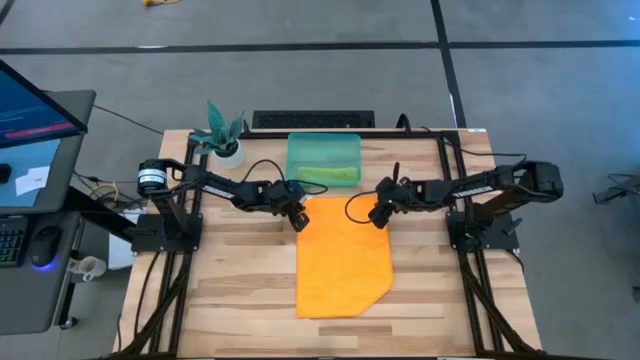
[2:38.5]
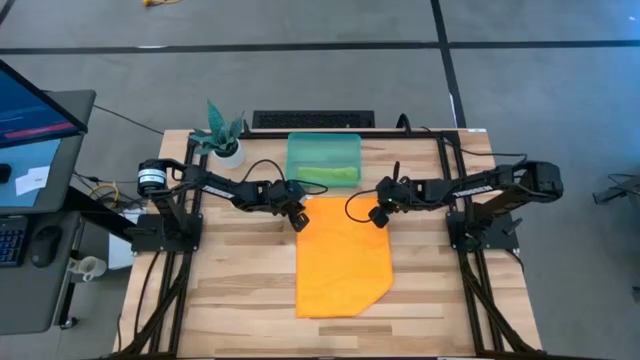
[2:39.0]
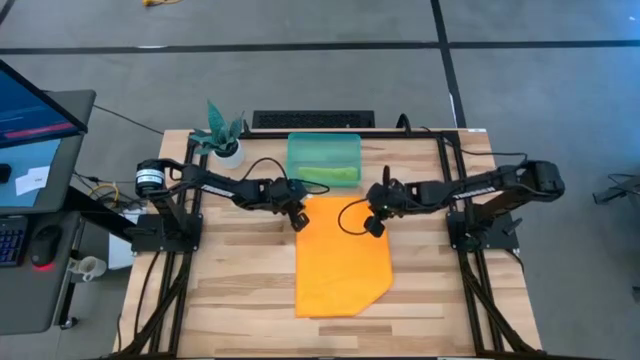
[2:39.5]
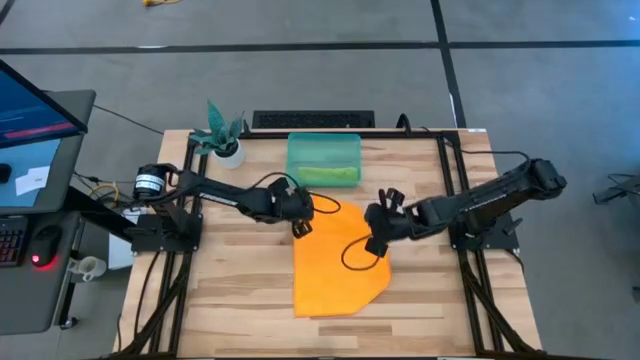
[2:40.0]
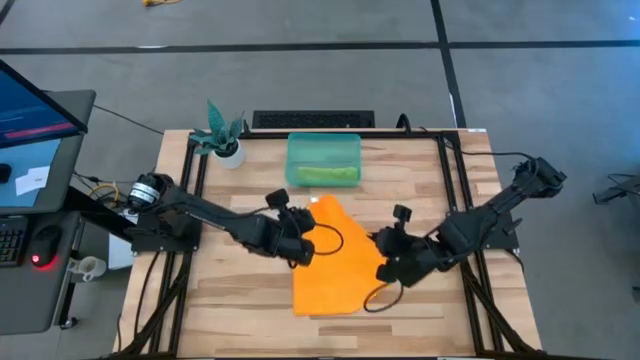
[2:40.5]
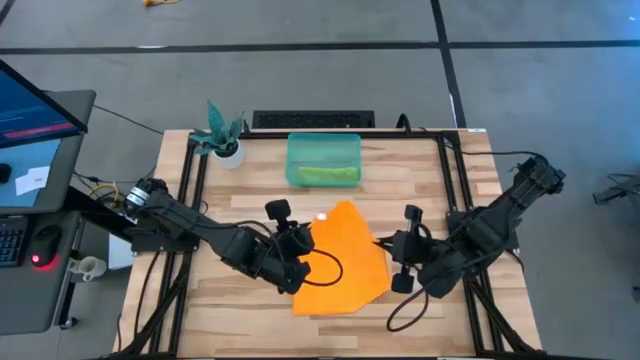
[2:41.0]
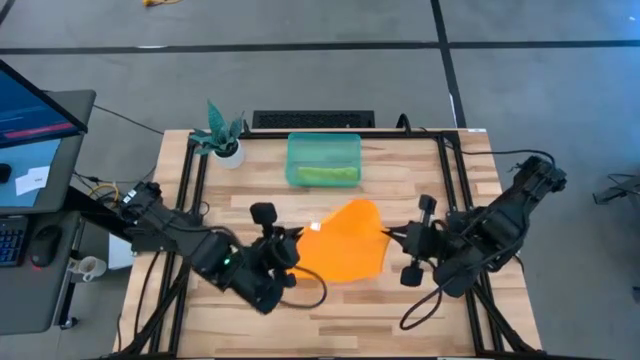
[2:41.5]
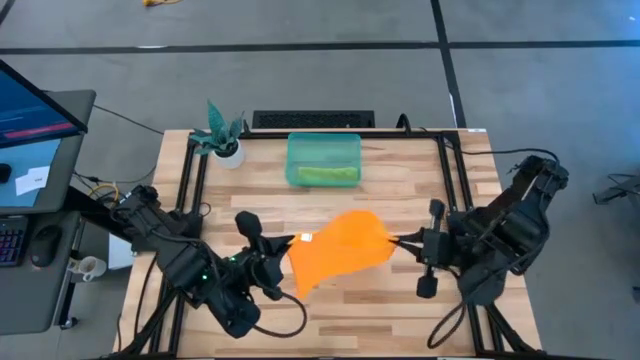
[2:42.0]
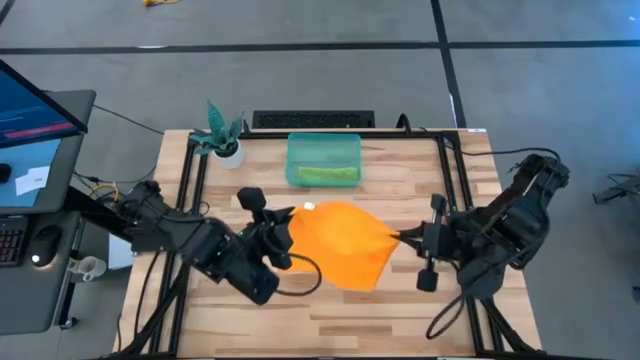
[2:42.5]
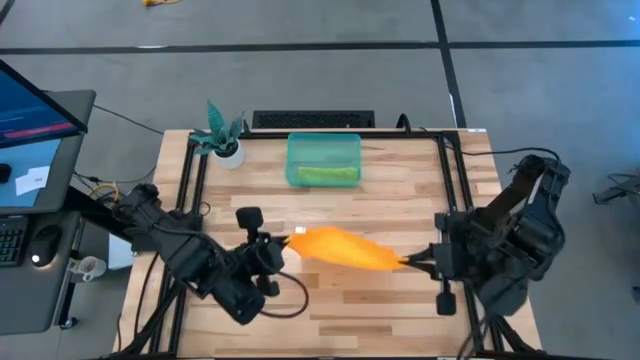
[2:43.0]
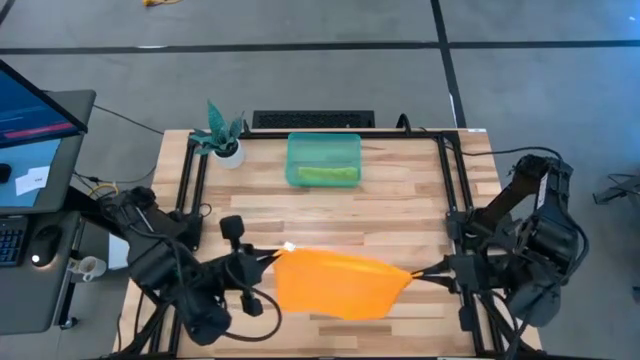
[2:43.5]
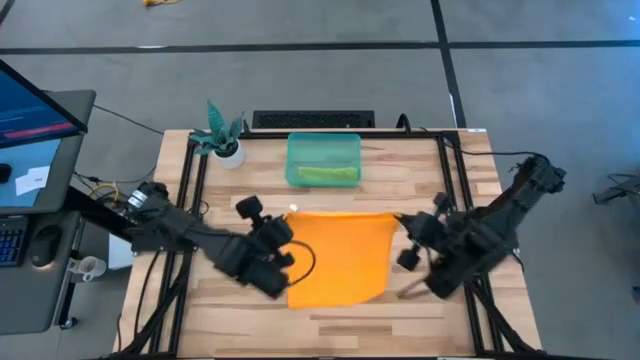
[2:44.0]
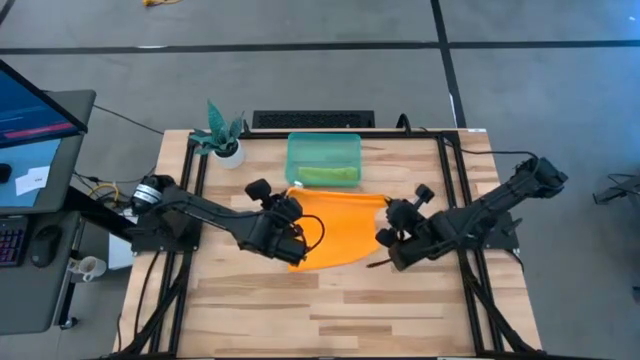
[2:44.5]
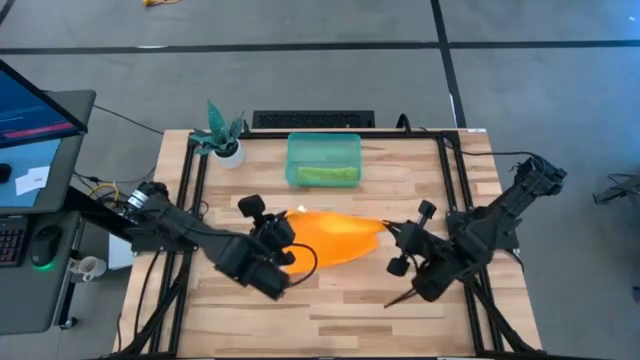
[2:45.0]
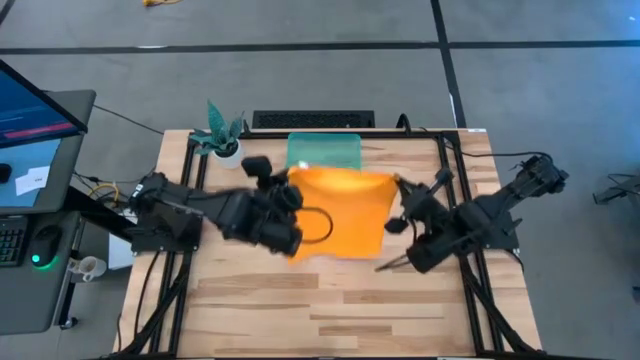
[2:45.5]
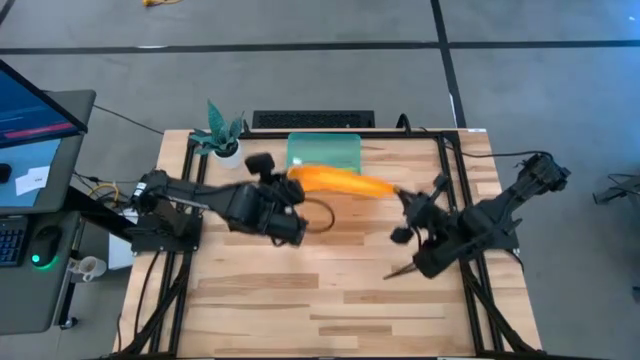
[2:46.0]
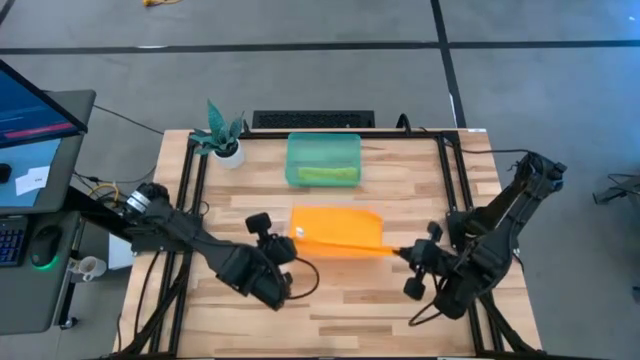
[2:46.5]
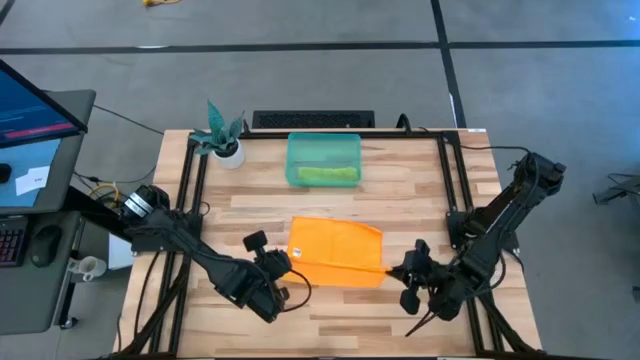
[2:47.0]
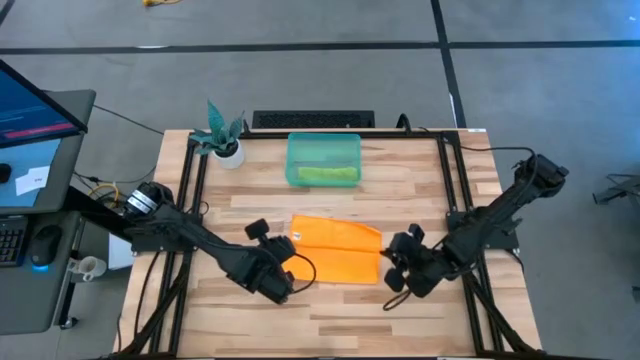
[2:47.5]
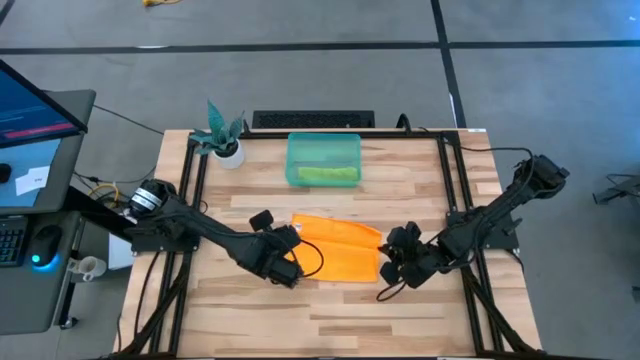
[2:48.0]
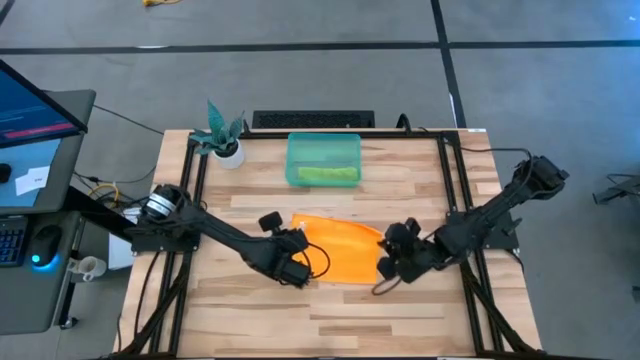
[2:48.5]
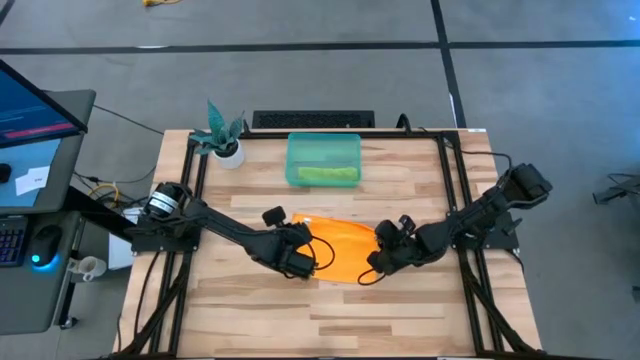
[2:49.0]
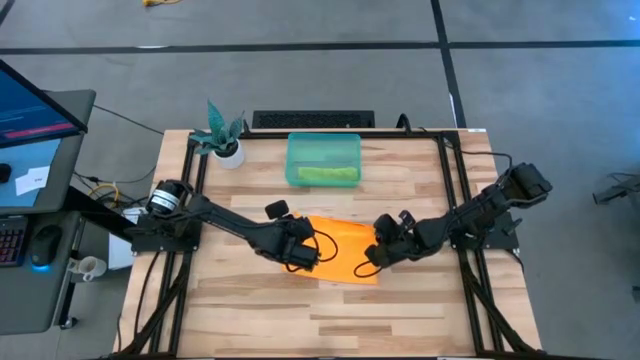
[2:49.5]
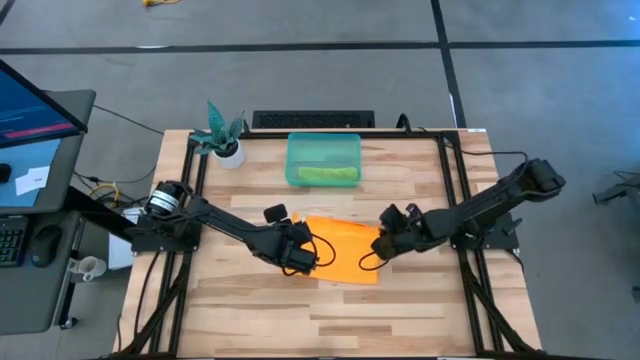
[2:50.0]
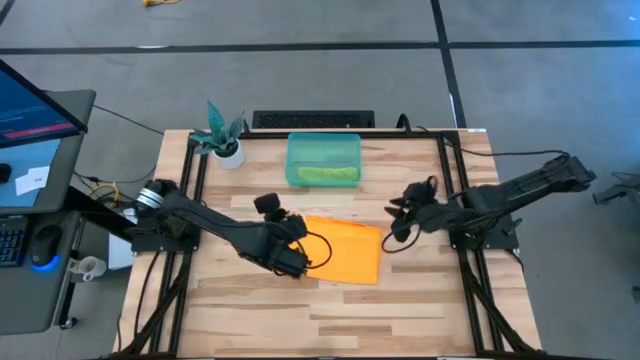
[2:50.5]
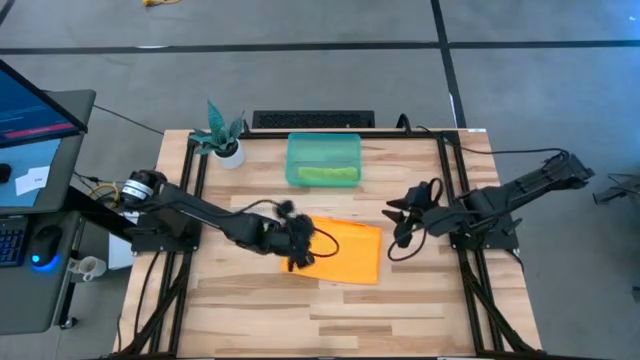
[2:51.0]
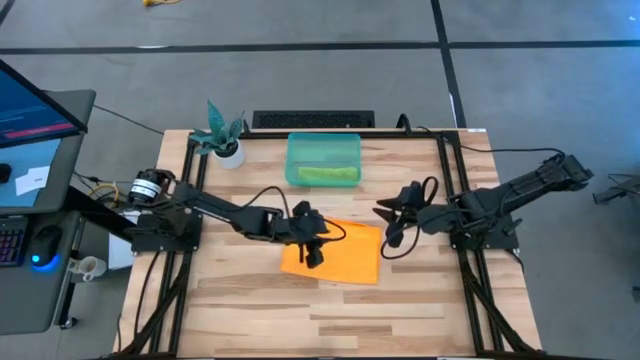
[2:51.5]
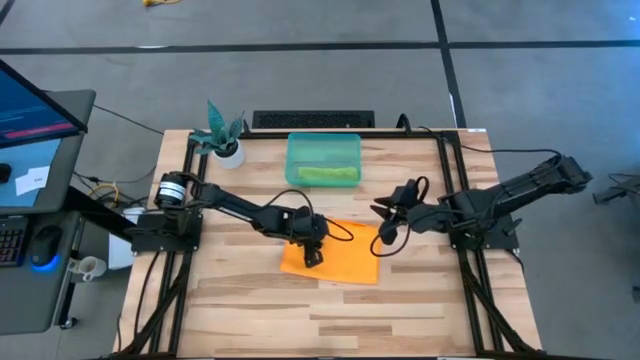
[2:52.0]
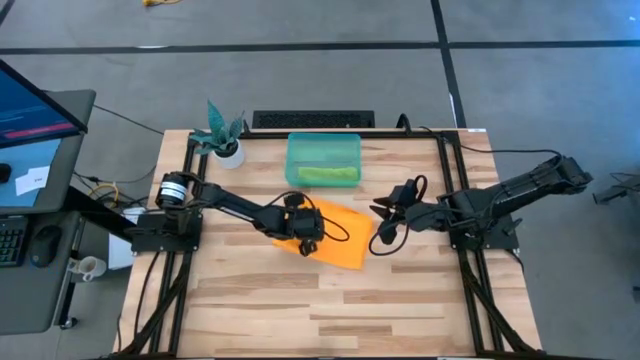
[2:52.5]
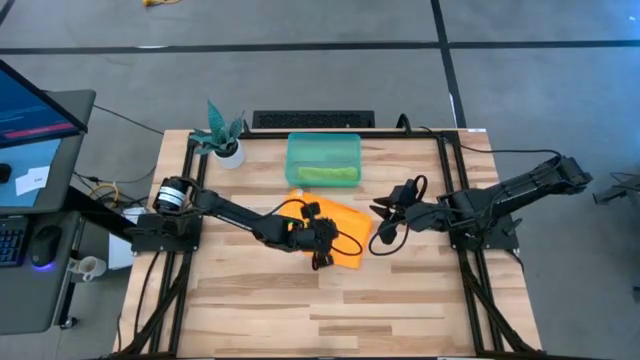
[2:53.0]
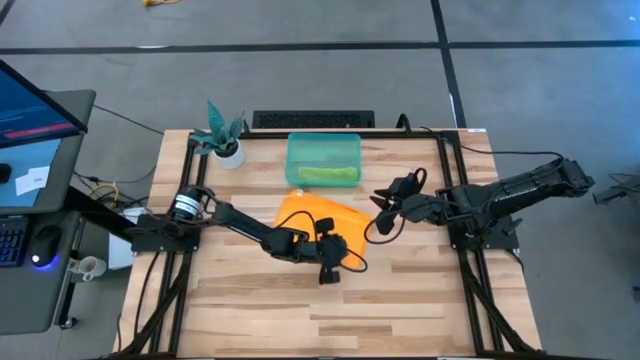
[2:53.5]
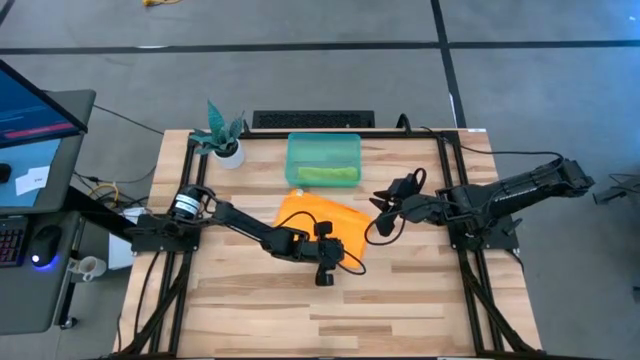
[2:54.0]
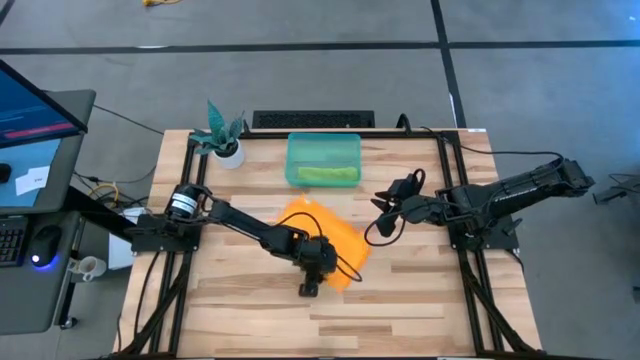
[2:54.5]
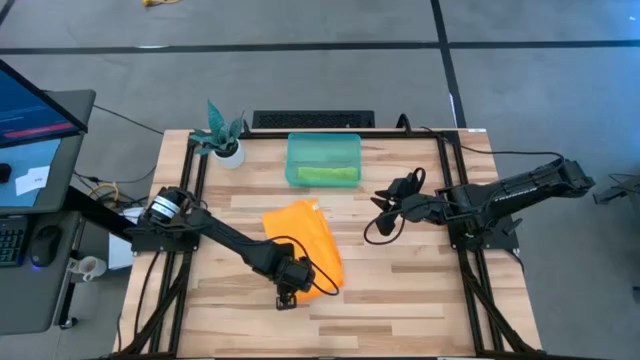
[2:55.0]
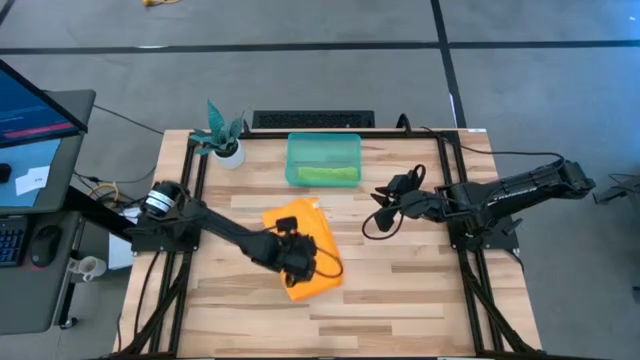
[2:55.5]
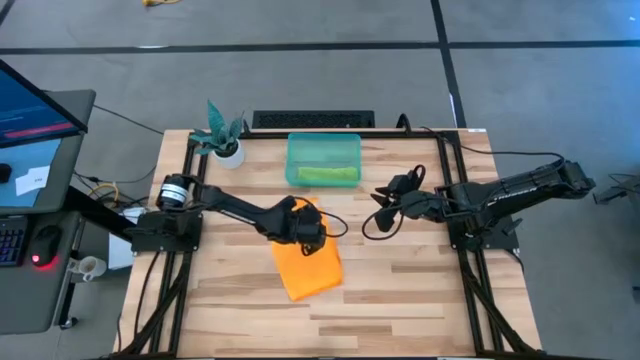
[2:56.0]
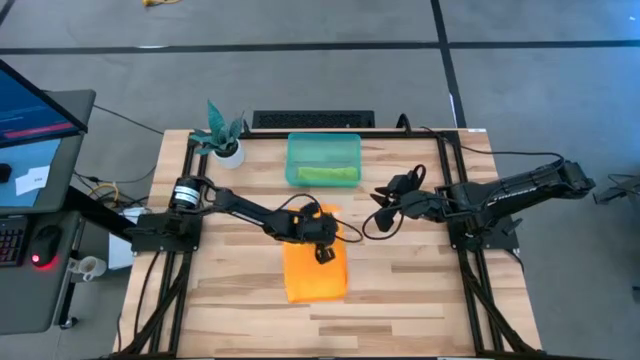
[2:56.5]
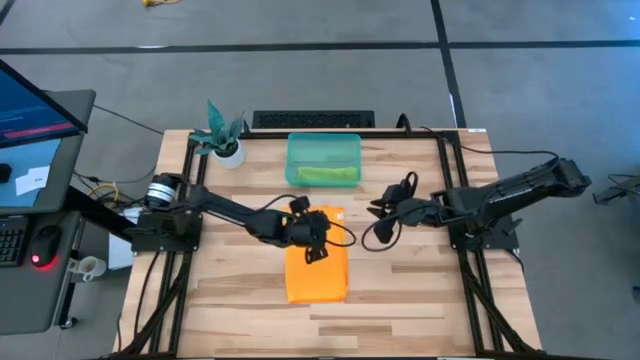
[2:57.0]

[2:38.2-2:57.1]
Task: Roll microfiber towels into tight, uniform cylinder then place into a basket
Fold the orange towel
